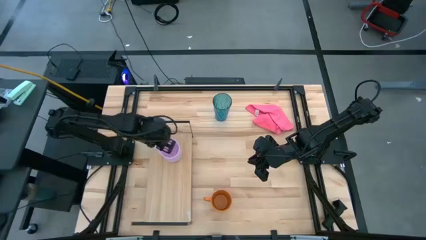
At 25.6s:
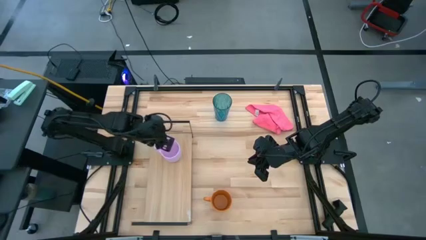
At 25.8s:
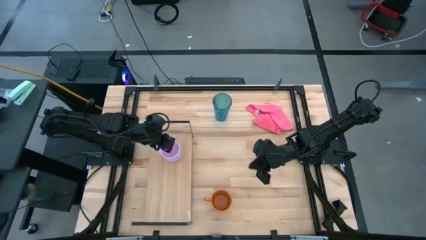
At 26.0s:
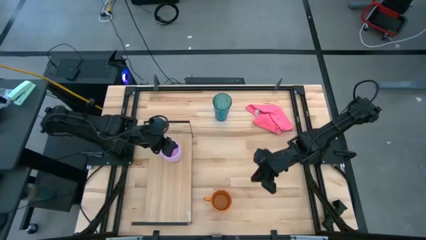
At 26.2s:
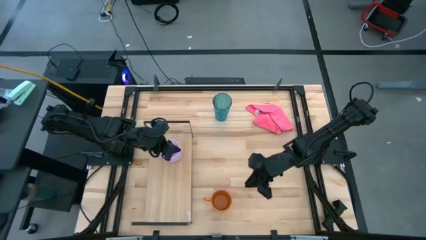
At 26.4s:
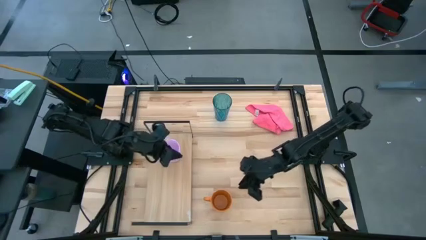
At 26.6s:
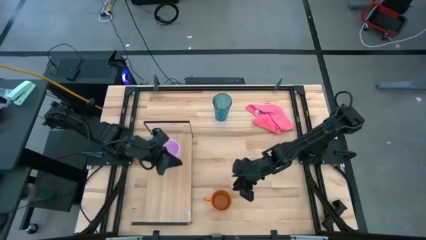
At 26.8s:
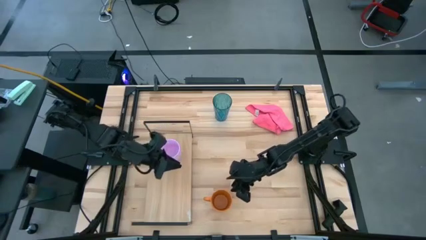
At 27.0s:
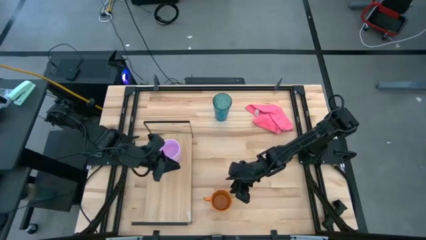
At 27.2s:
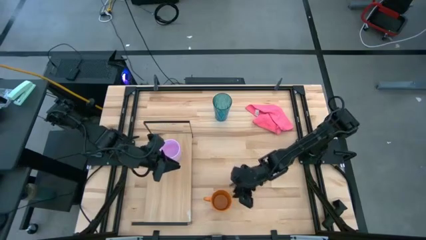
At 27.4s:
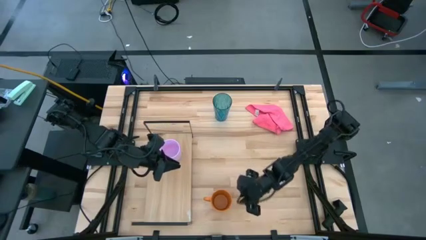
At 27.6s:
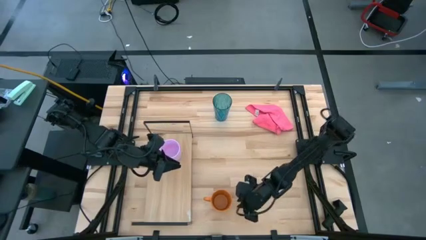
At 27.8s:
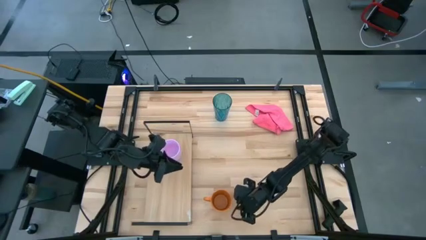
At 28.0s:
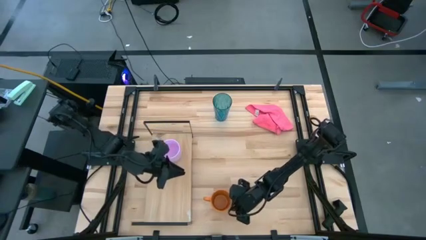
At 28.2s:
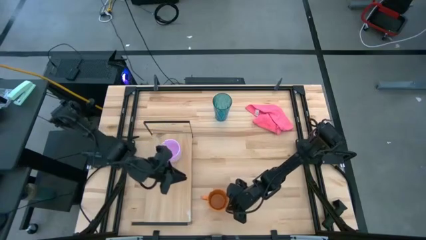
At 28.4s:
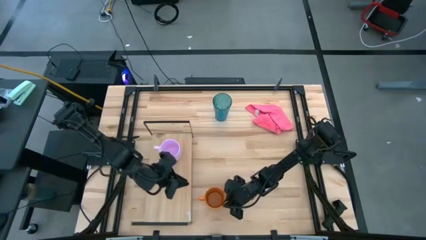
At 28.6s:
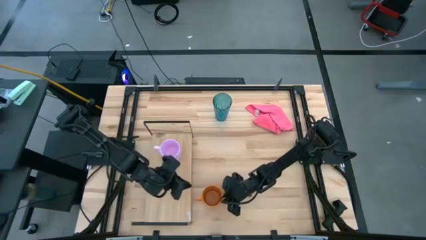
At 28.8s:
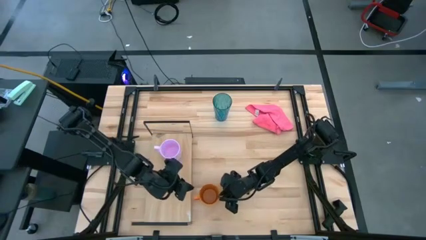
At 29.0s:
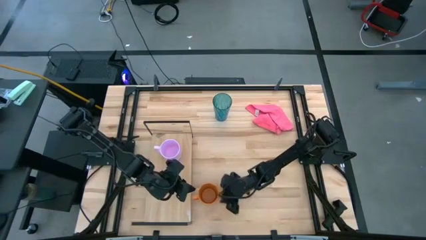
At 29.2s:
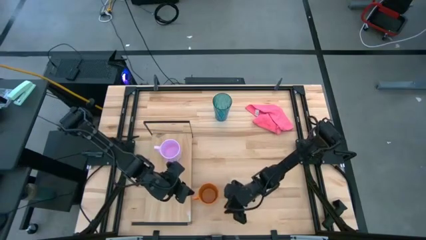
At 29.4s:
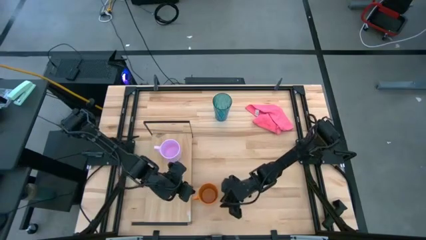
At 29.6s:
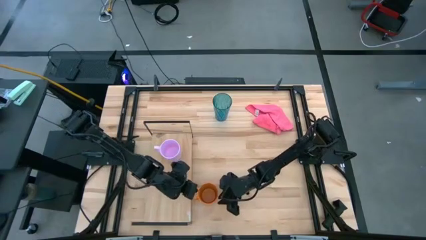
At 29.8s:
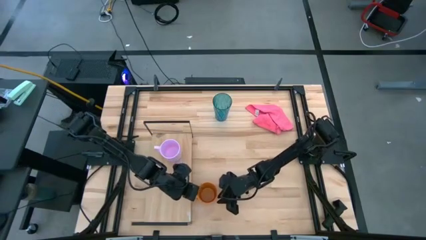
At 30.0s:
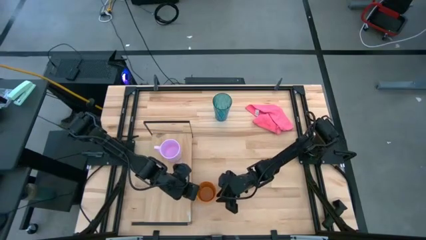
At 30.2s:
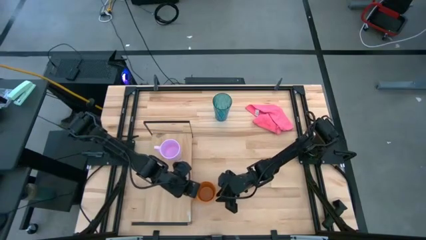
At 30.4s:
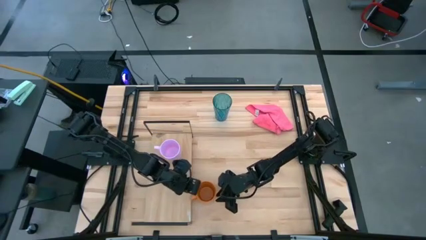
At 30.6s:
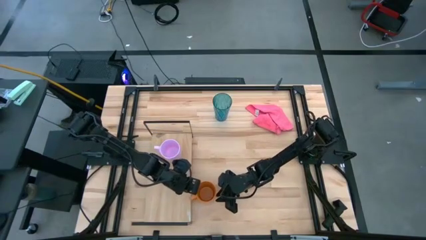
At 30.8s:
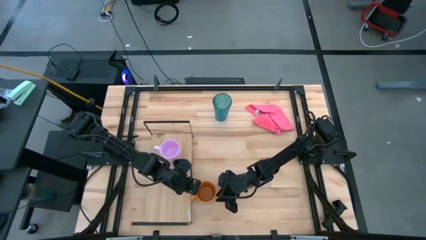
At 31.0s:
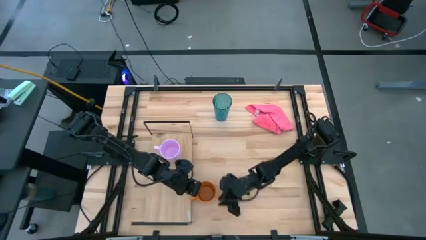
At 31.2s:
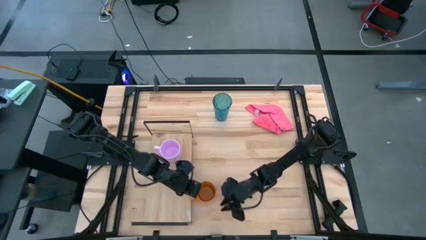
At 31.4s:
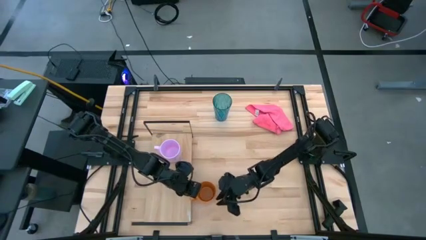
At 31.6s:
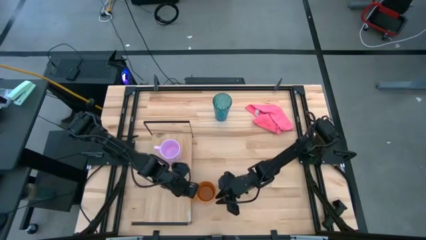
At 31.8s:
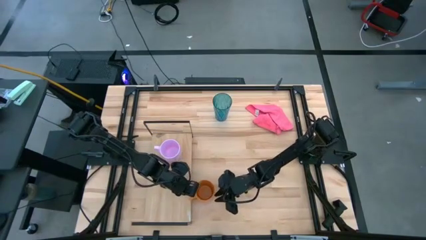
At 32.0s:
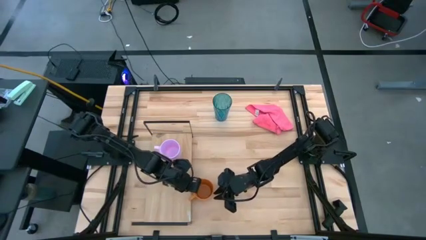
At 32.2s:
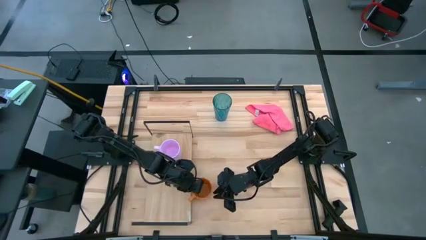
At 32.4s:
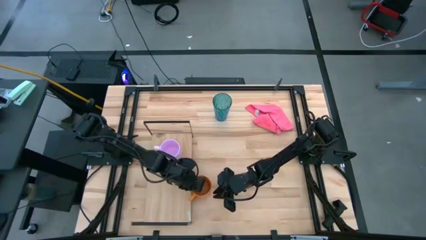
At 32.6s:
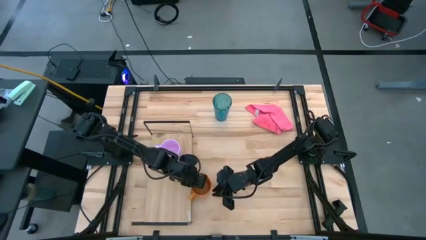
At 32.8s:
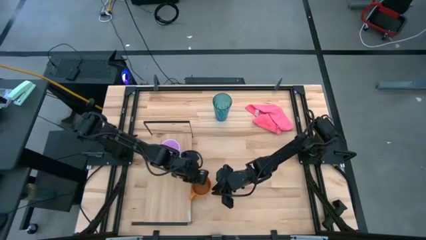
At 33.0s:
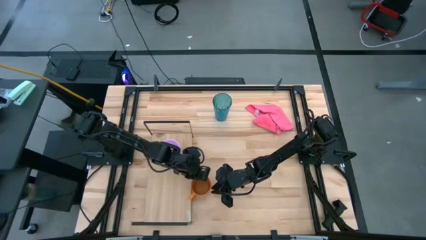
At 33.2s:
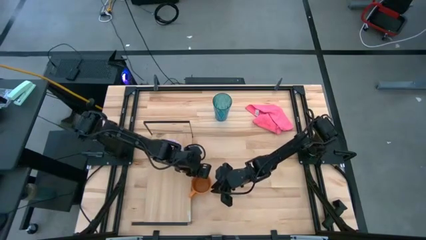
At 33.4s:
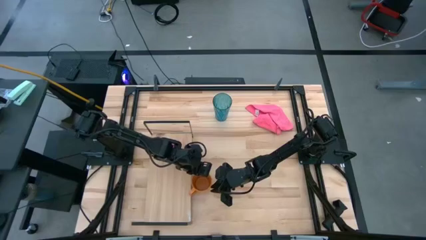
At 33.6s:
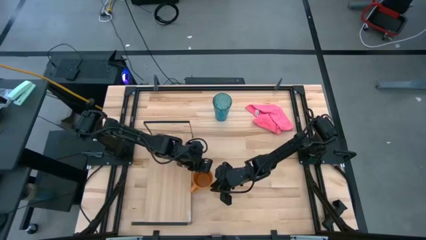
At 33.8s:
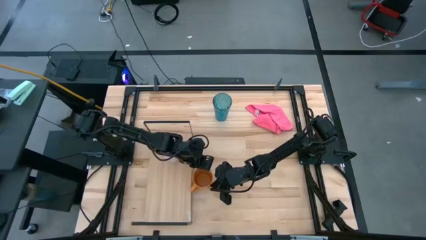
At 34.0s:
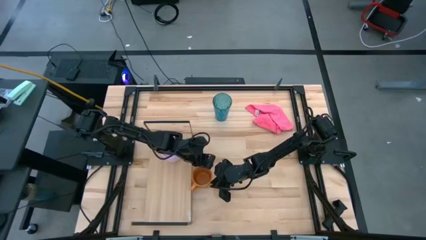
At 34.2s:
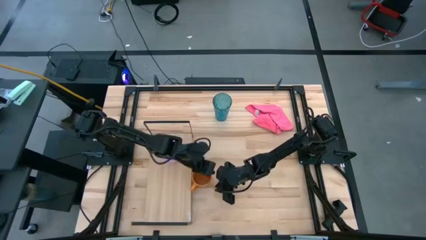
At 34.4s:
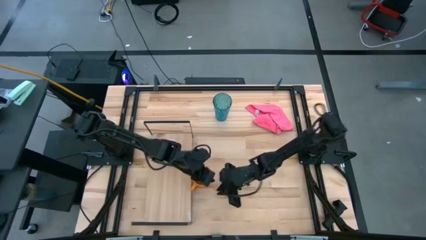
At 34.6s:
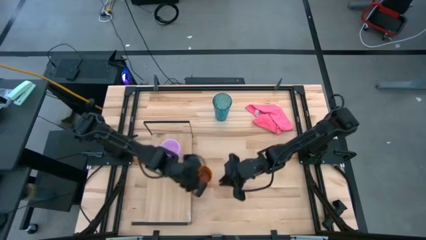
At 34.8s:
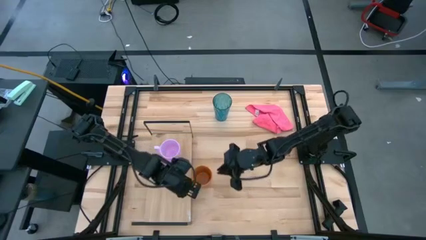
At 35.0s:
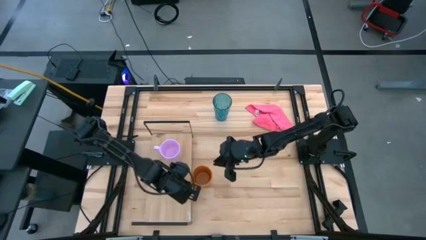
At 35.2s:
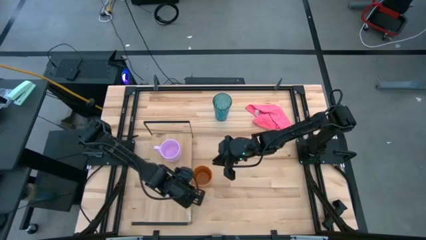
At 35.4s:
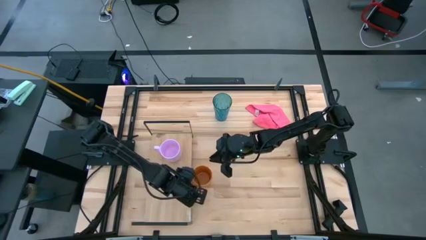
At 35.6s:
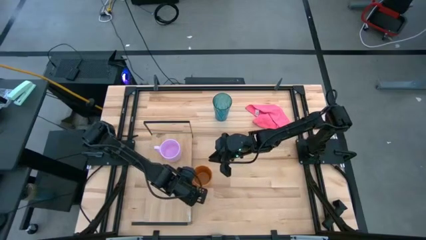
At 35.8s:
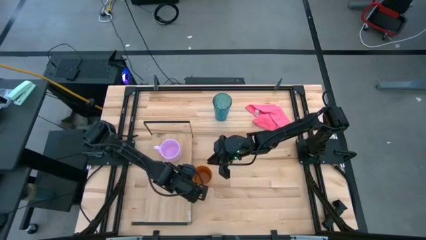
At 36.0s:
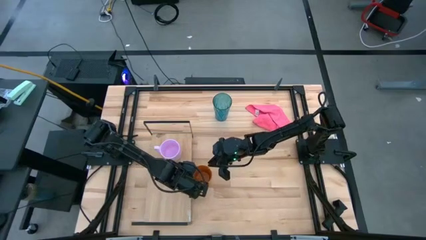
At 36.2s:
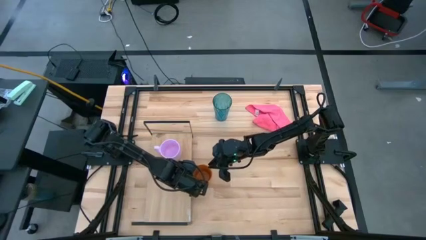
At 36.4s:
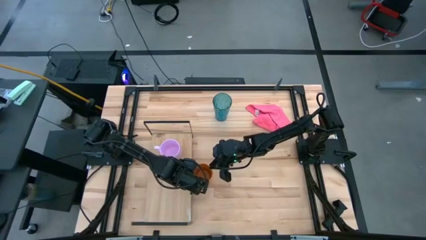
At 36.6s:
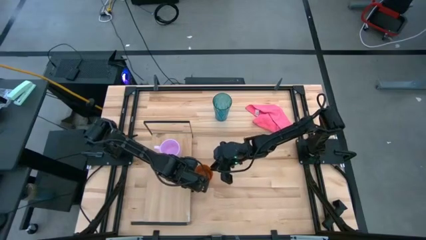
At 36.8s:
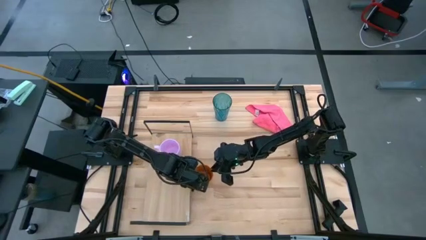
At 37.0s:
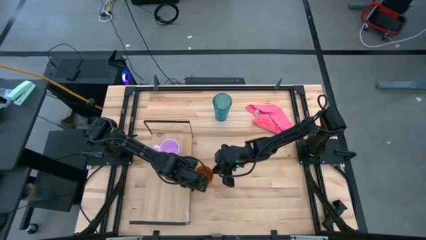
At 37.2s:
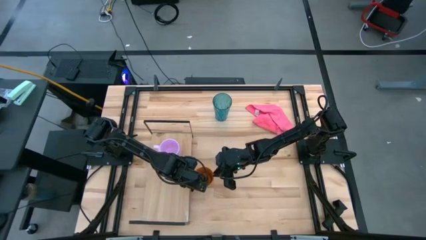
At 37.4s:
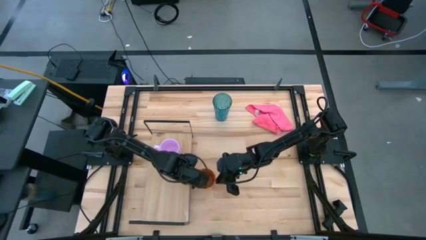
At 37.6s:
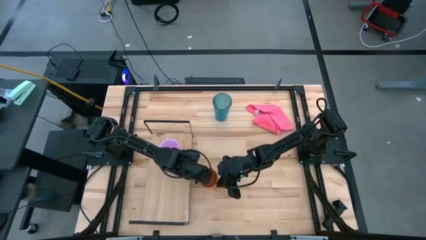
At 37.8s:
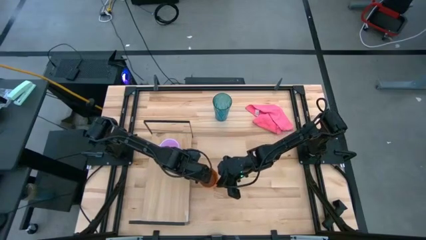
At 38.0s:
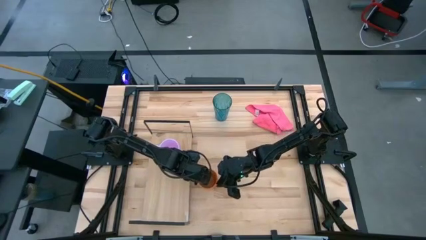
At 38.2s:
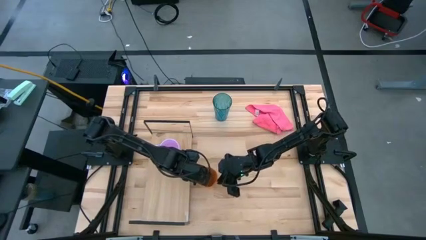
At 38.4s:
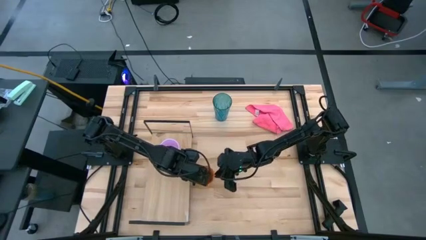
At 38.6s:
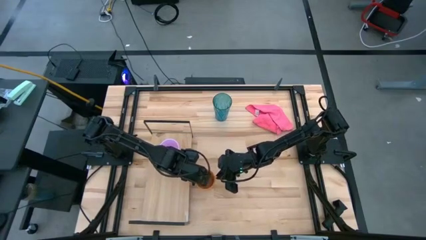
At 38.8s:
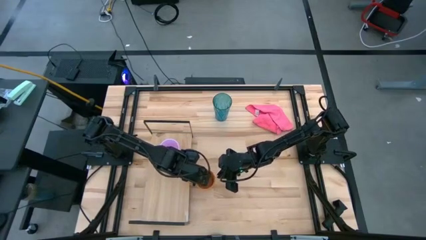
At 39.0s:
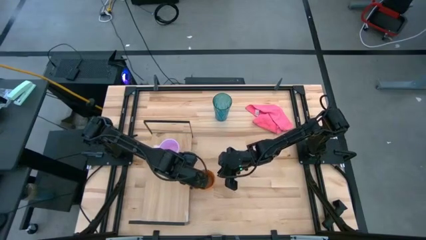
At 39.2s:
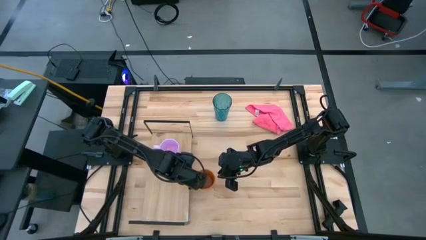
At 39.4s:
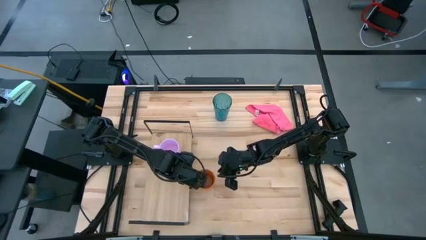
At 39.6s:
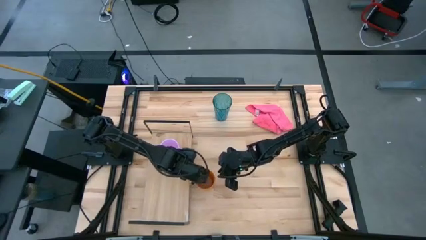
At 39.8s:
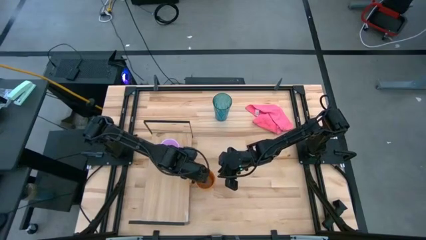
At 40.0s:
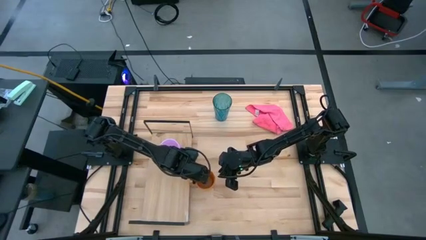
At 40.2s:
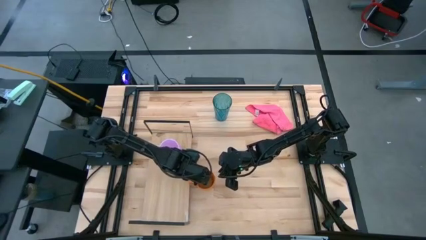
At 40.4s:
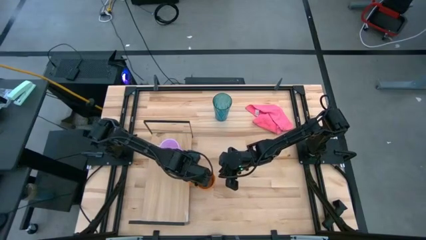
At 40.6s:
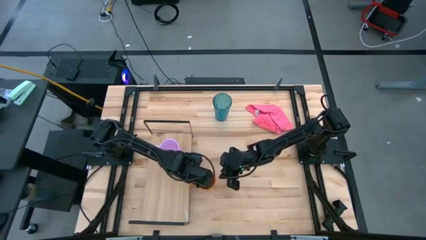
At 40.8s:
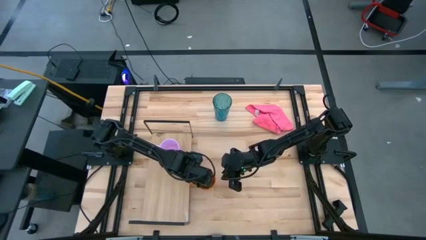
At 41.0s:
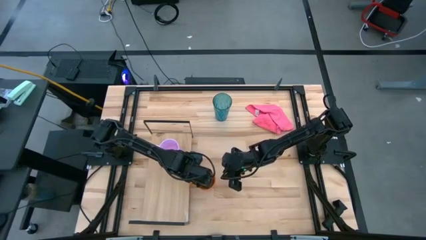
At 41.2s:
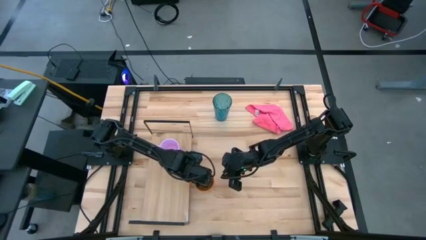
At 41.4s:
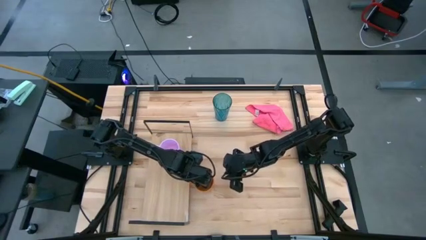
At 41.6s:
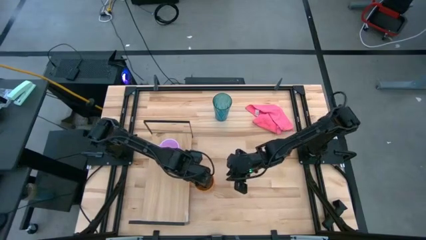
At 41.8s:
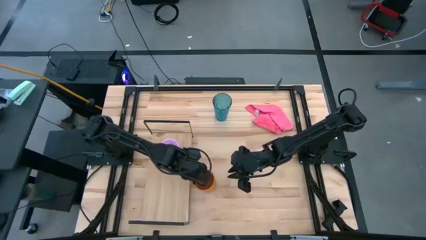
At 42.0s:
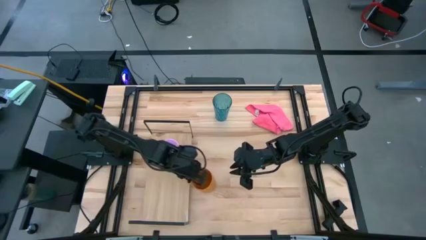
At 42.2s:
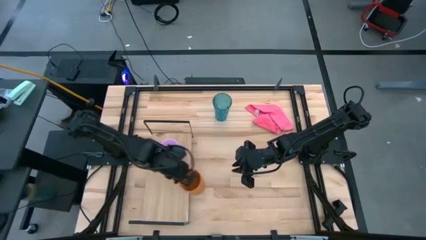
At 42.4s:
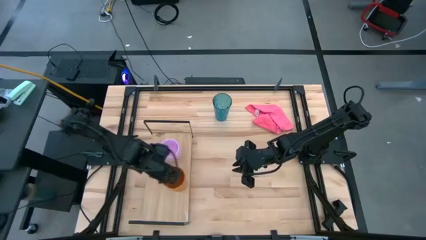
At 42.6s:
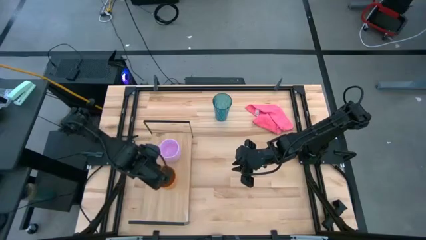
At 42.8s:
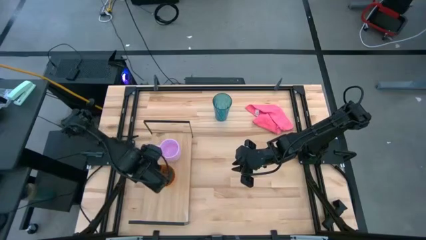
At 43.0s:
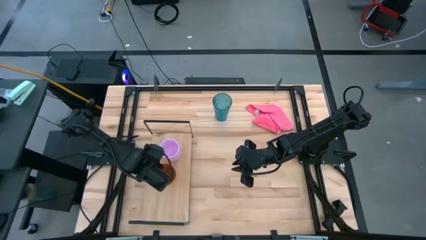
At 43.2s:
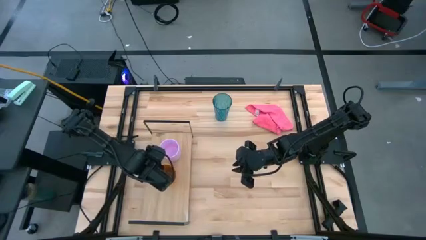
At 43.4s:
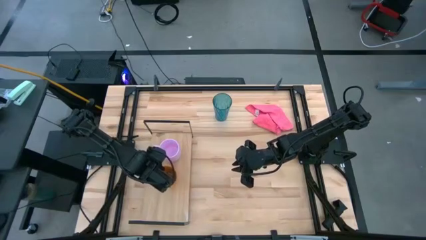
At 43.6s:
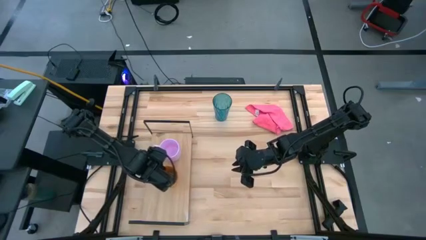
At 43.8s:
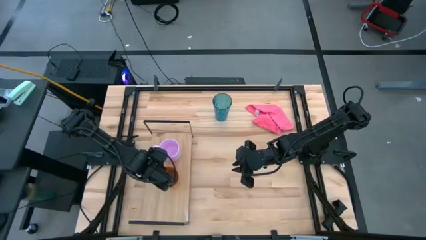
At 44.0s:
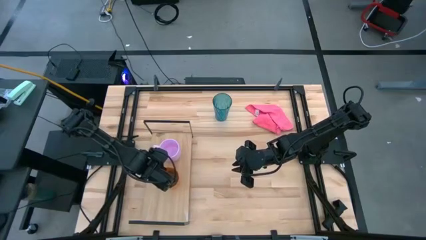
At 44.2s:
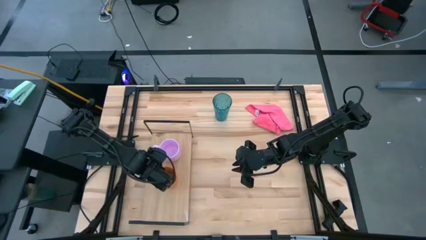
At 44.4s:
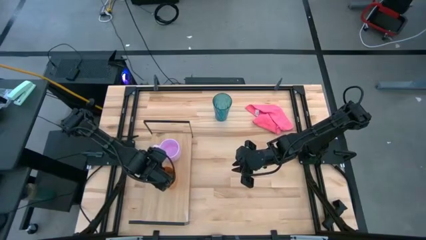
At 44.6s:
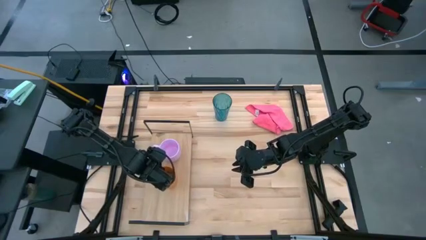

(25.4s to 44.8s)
Task: Stack small to large cups/mugs on shelf
Put the orange cup on the shelf
